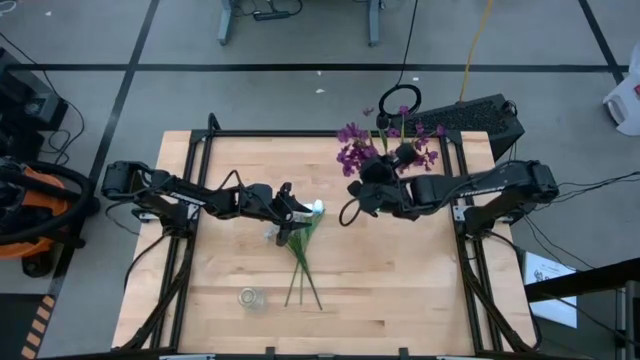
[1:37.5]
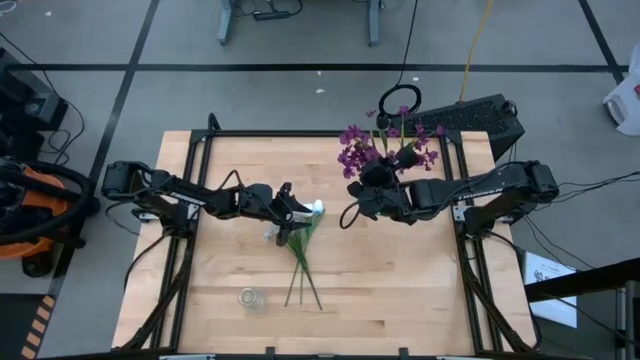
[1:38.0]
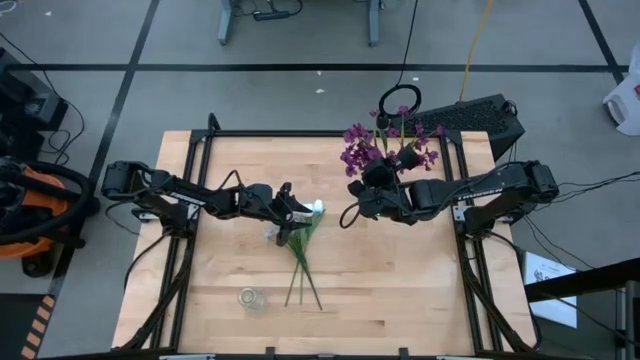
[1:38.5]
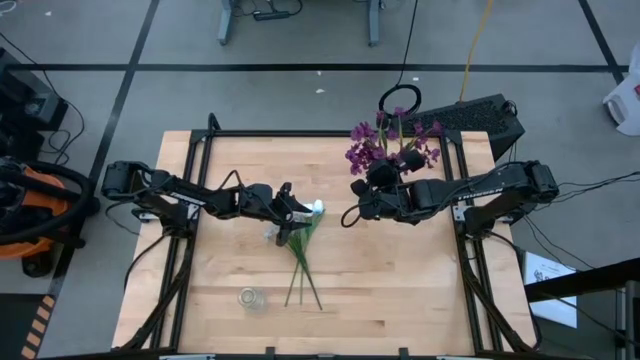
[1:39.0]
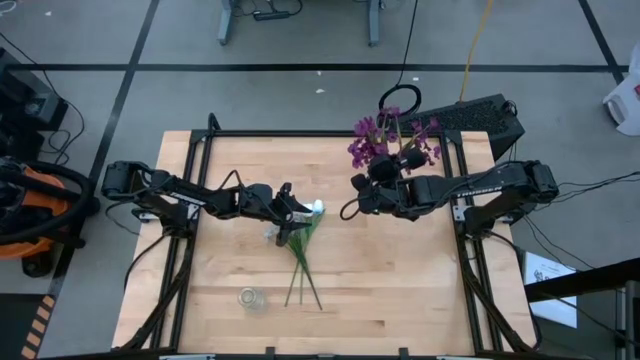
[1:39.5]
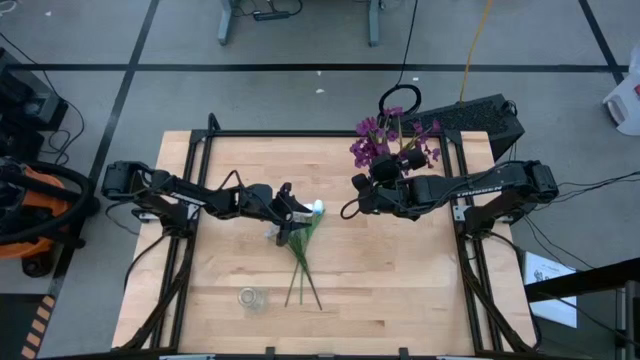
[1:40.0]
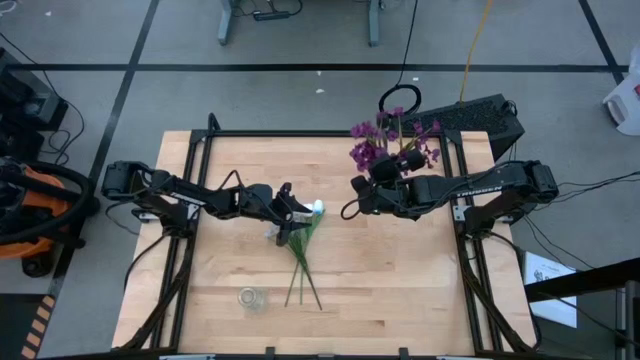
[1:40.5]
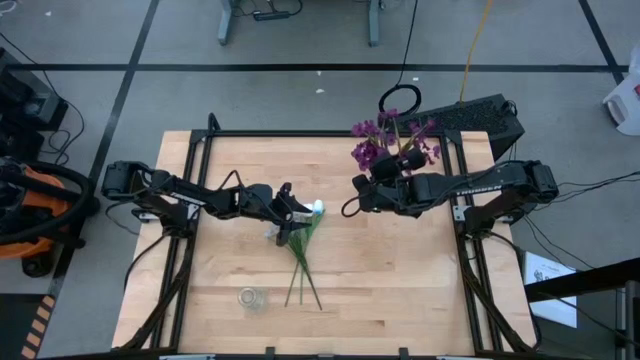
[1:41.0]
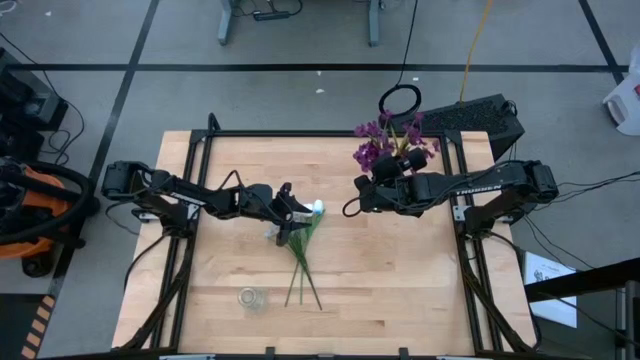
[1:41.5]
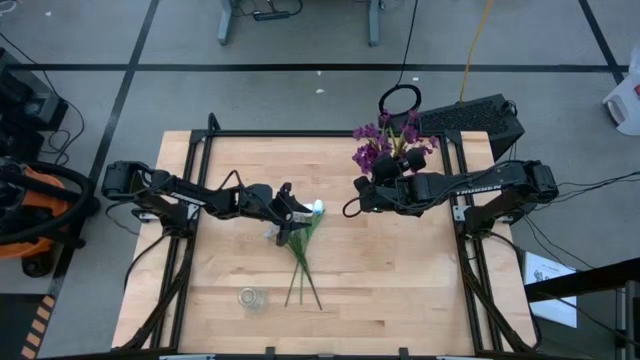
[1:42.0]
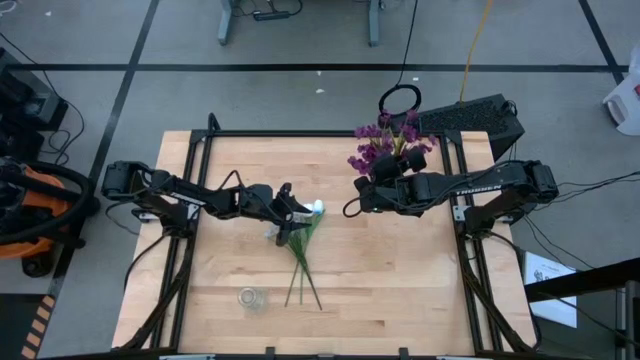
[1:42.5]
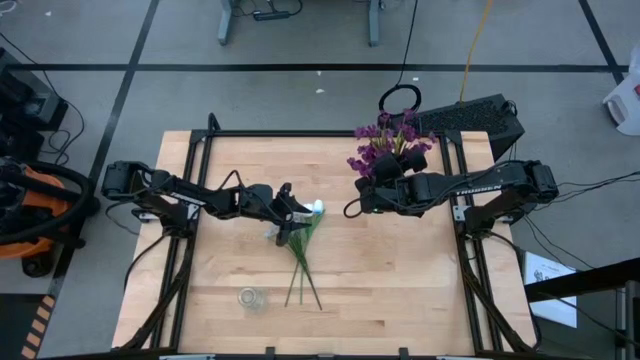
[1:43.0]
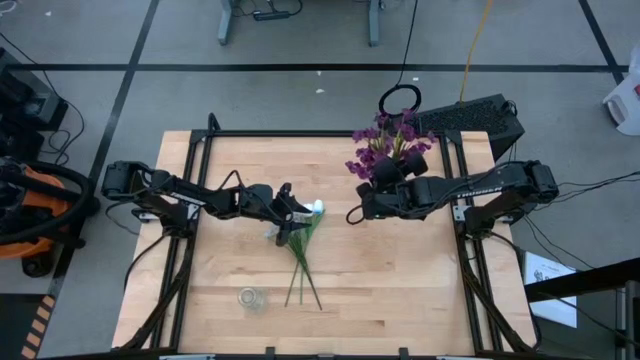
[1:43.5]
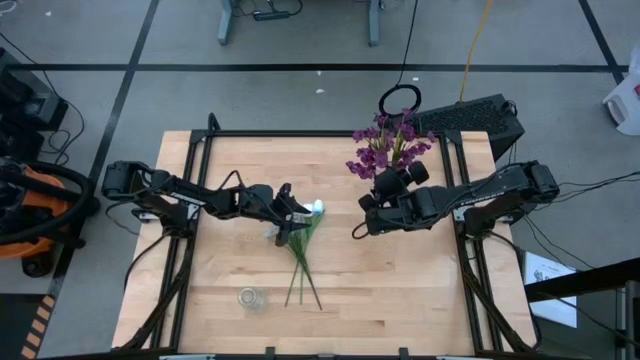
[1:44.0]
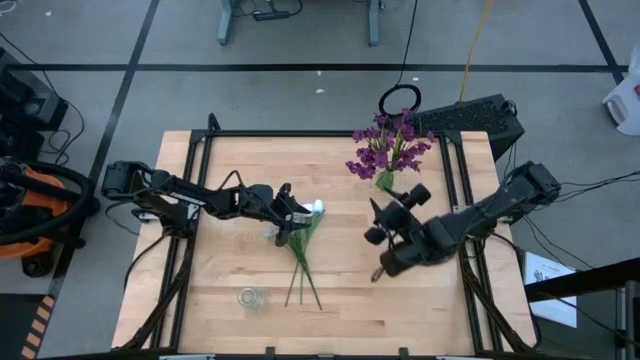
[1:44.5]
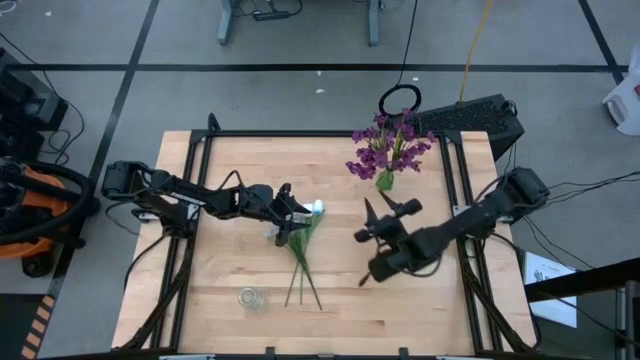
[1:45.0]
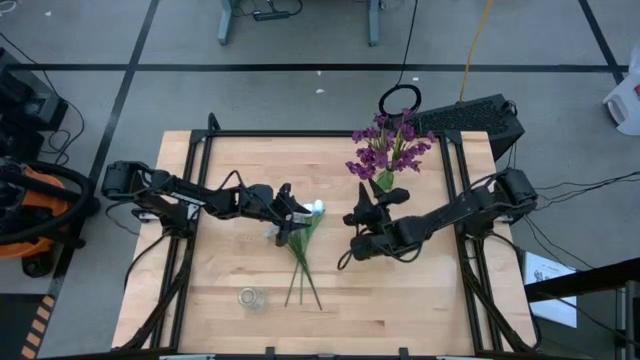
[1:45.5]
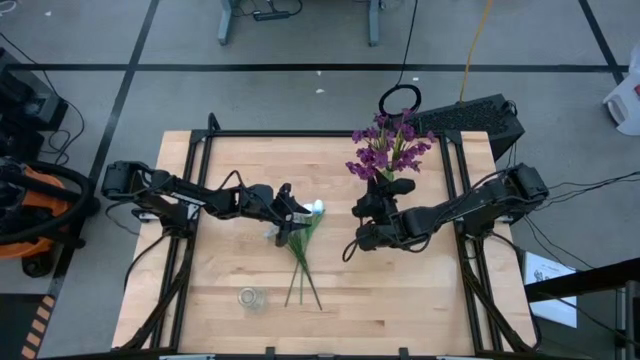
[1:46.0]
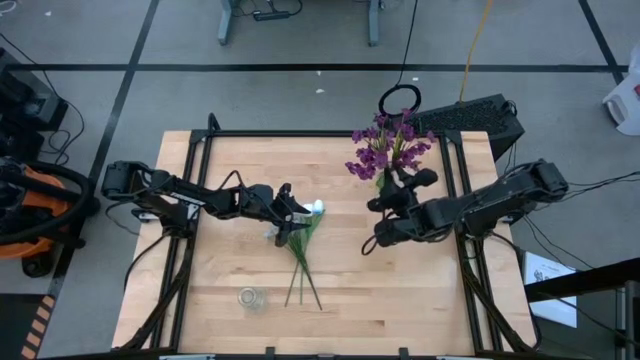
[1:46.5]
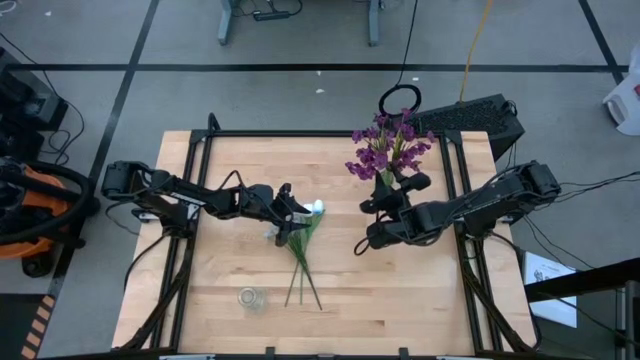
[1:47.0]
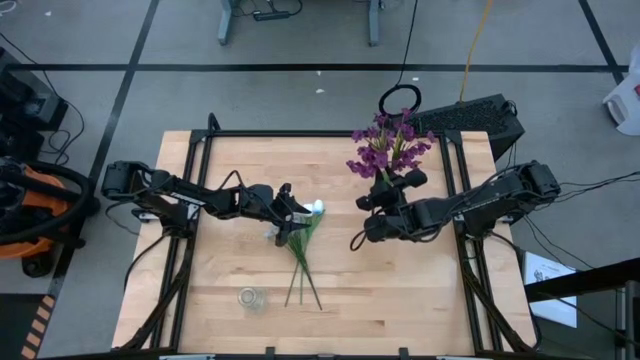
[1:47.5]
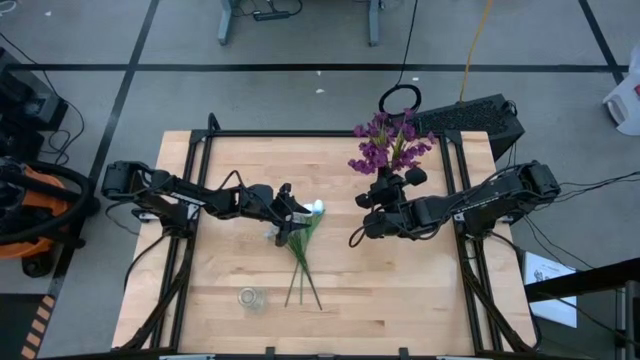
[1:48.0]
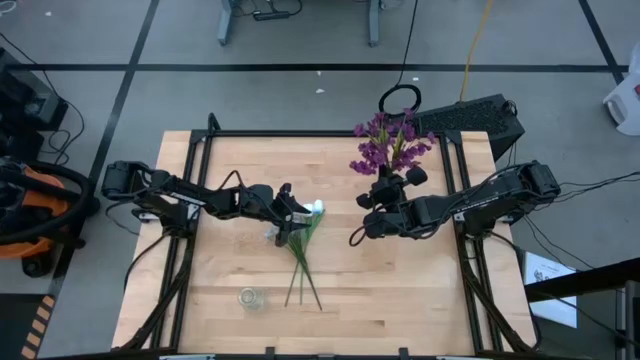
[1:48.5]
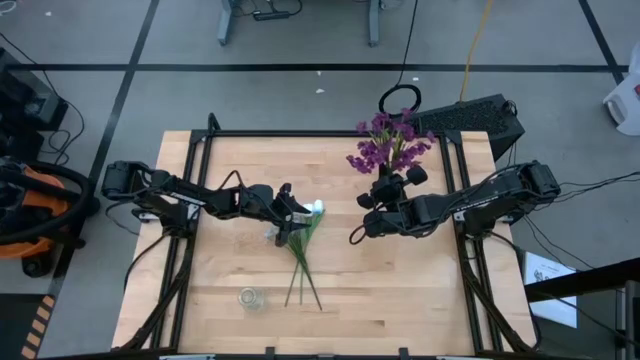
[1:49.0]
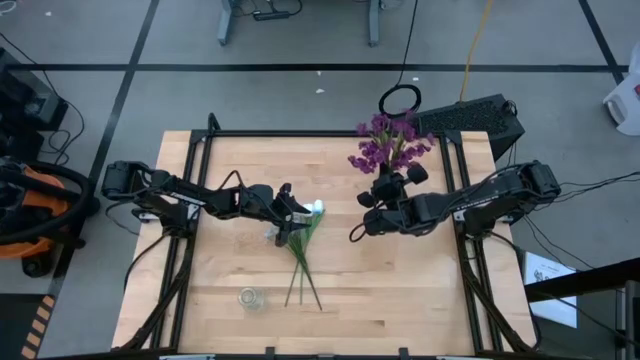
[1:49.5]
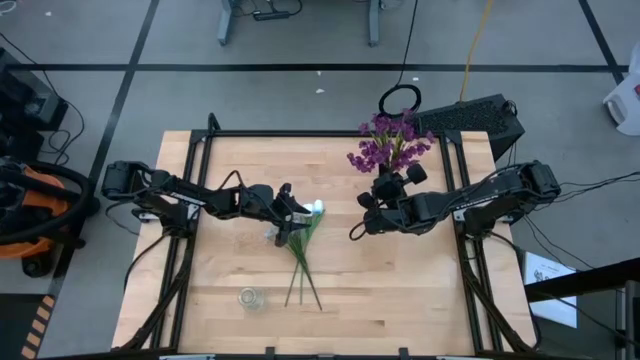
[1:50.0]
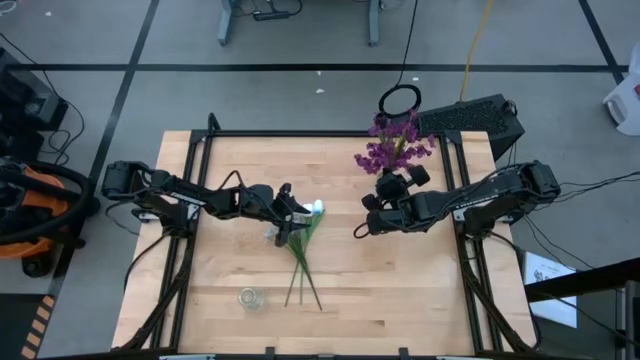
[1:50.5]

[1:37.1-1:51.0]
Task: Sort flowers into vase by color
Put the violet flower into the green vase

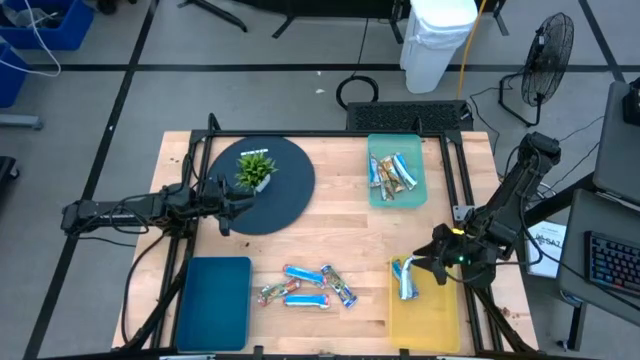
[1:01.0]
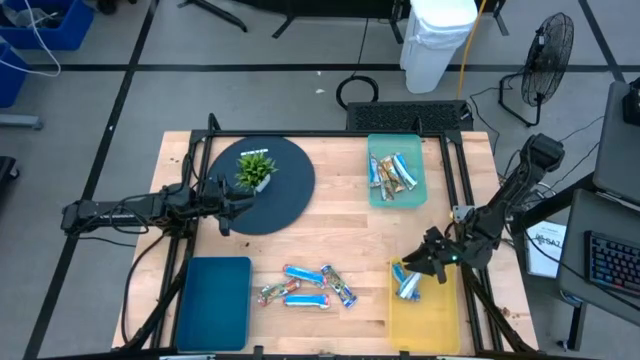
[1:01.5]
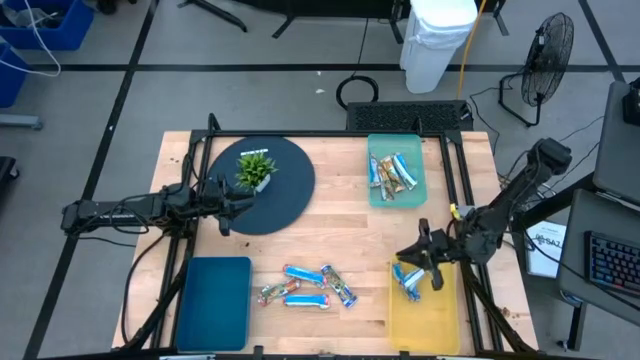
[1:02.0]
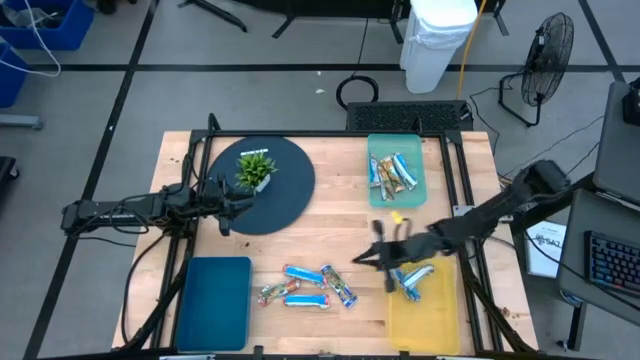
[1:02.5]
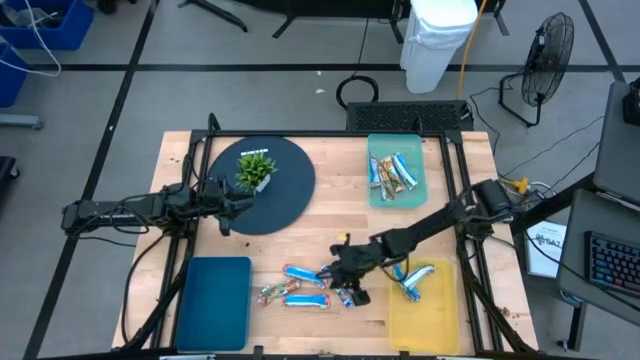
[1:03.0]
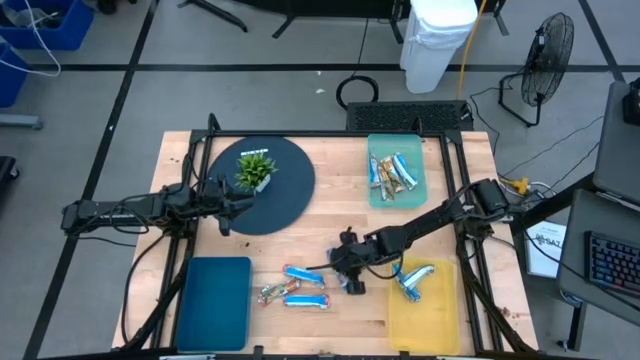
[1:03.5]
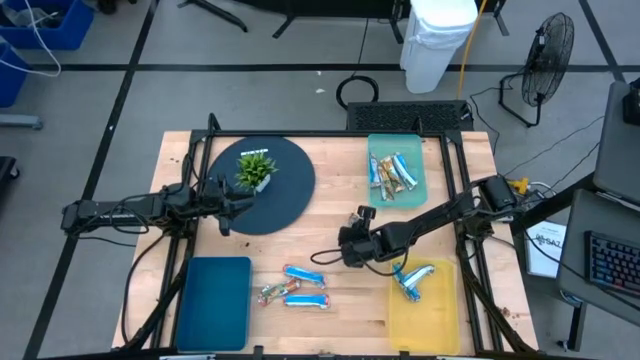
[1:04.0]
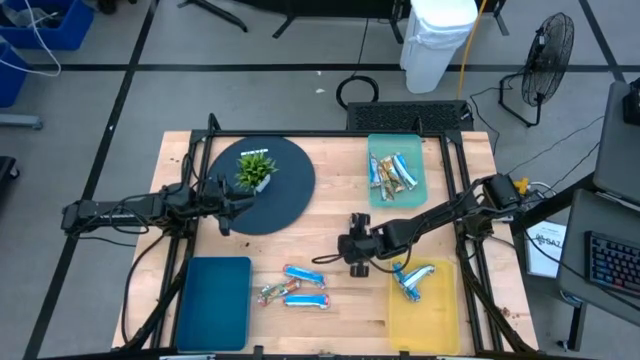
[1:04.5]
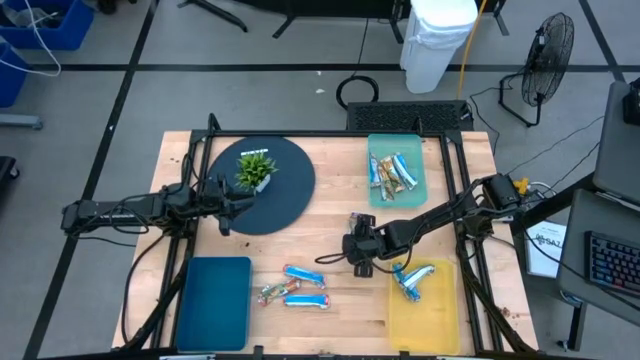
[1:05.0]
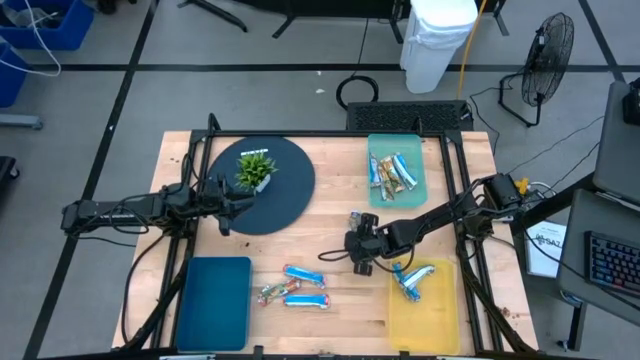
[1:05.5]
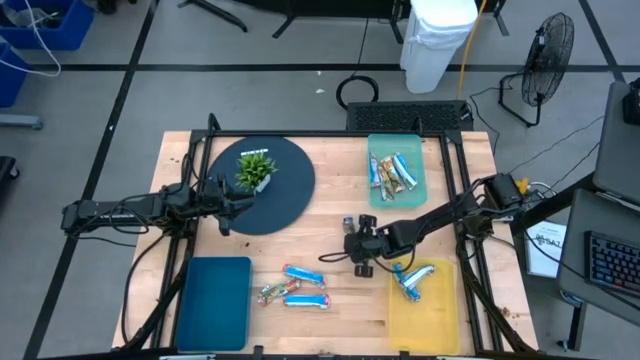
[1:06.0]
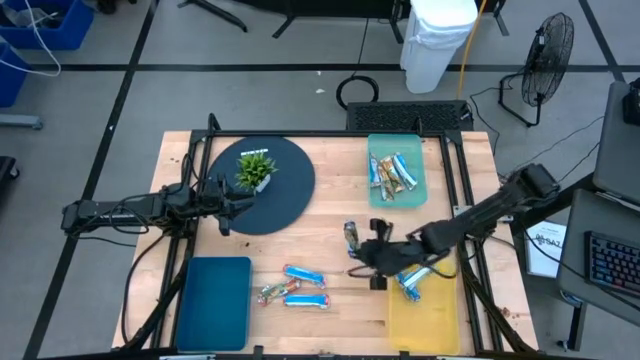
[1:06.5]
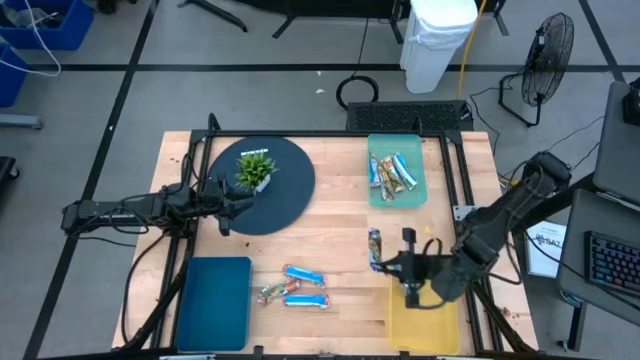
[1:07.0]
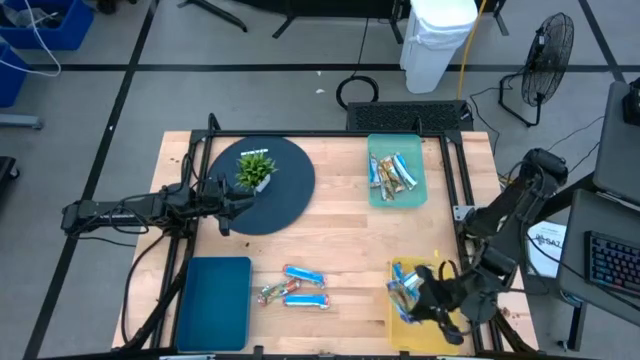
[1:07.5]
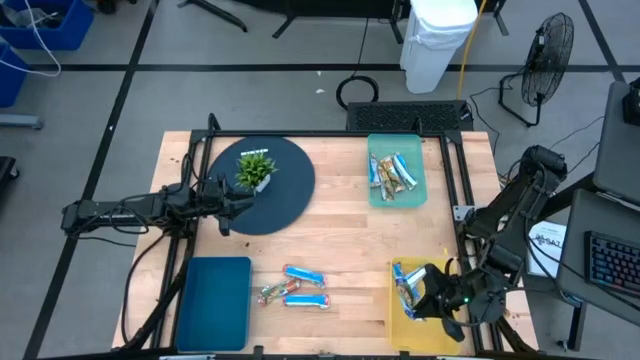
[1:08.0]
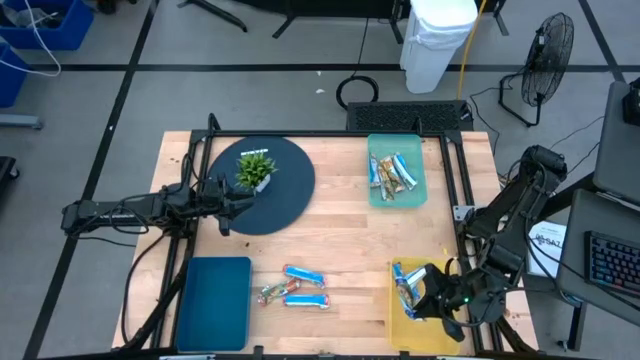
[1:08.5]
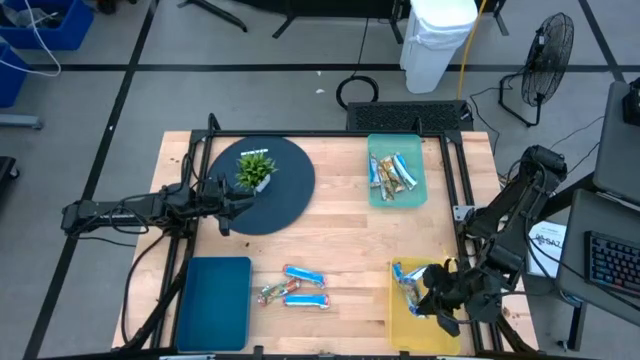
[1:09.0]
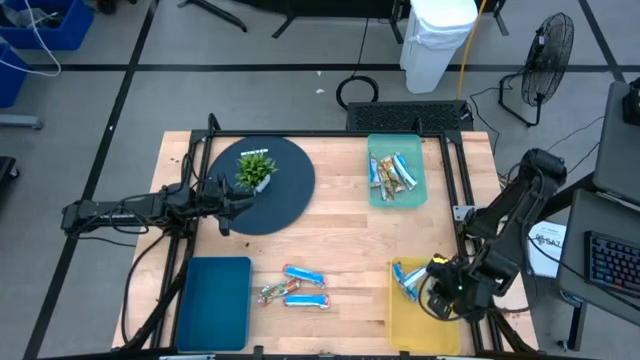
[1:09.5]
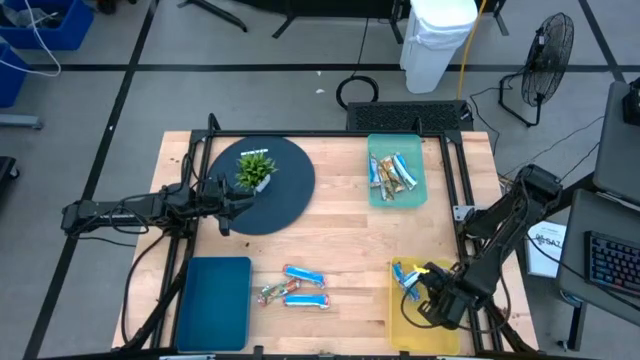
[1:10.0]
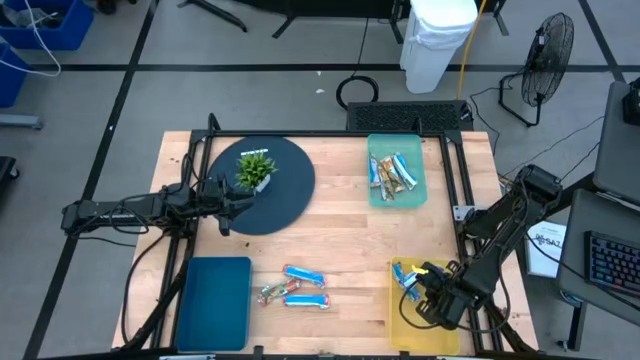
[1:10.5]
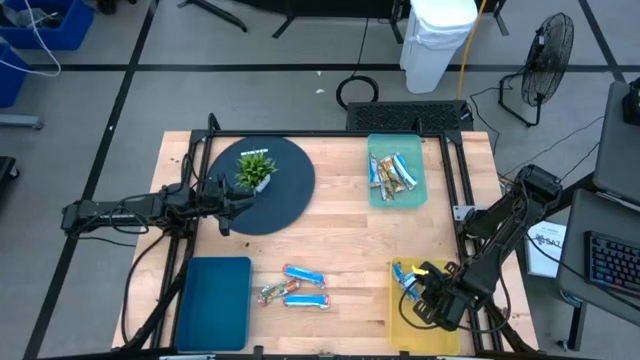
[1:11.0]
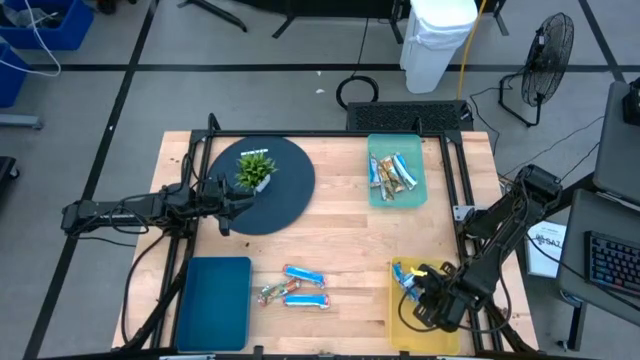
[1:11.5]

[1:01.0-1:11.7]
Task: Pick and place Granola Bars by type
Put the blue granola bar into the yellow bin
